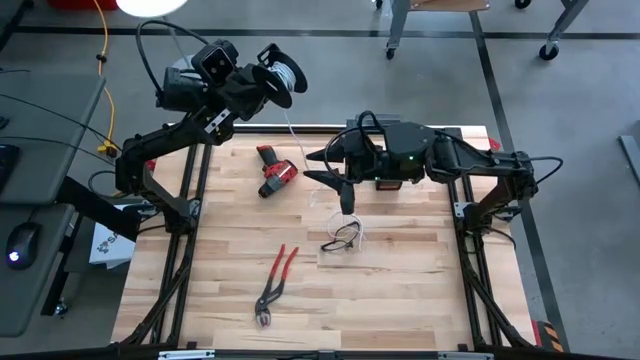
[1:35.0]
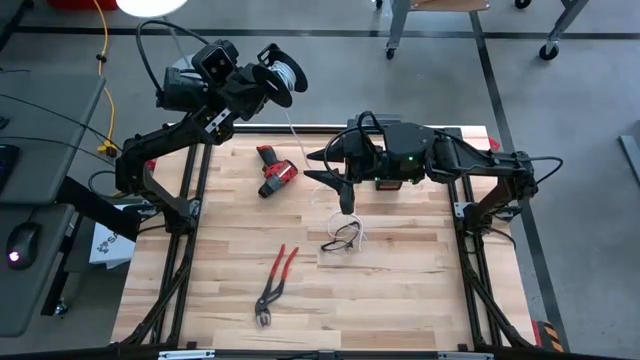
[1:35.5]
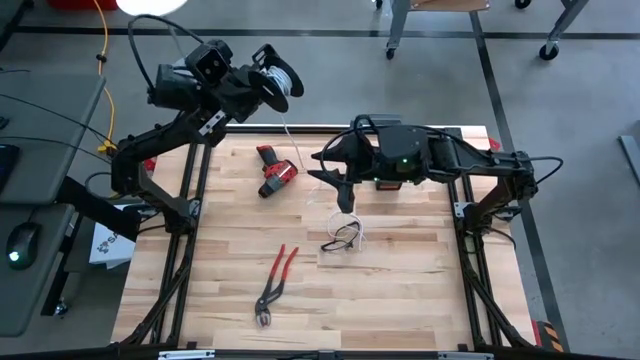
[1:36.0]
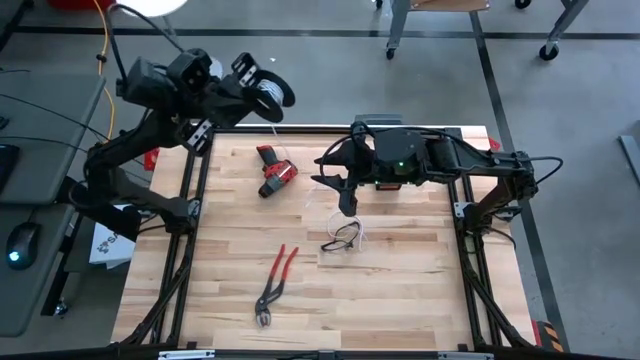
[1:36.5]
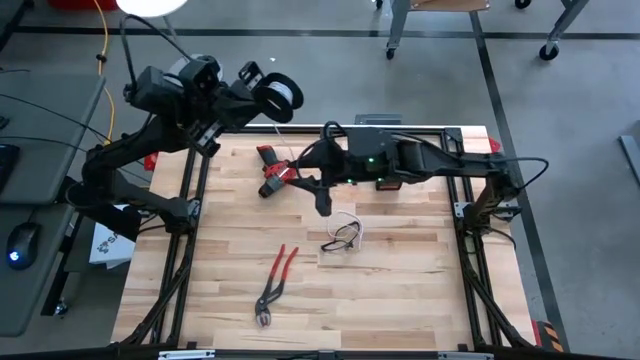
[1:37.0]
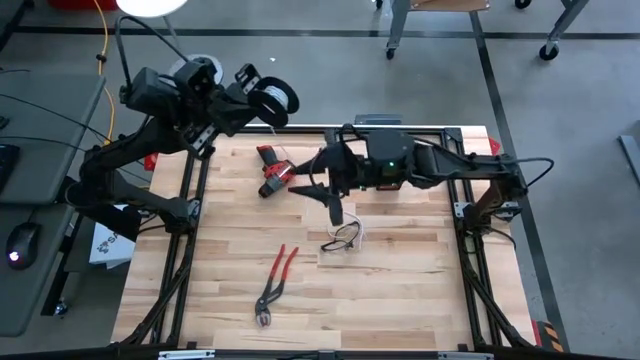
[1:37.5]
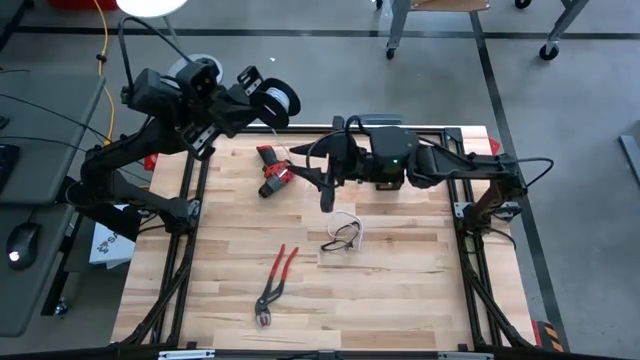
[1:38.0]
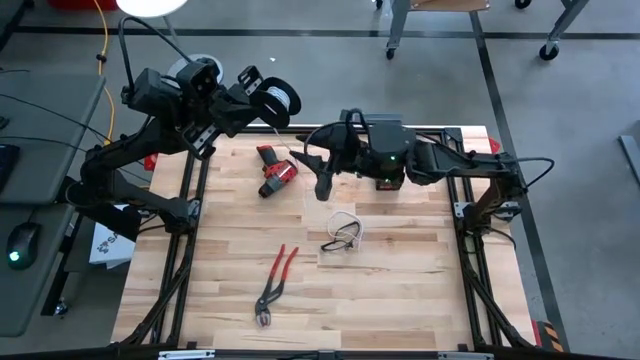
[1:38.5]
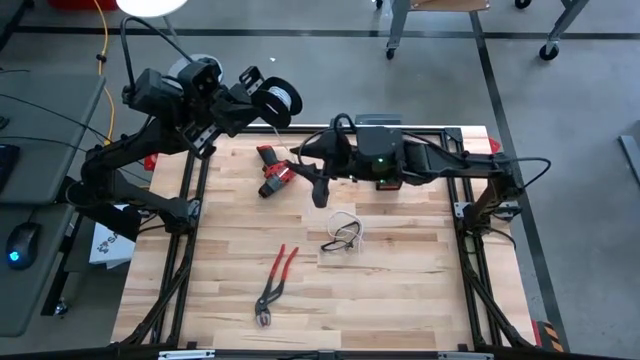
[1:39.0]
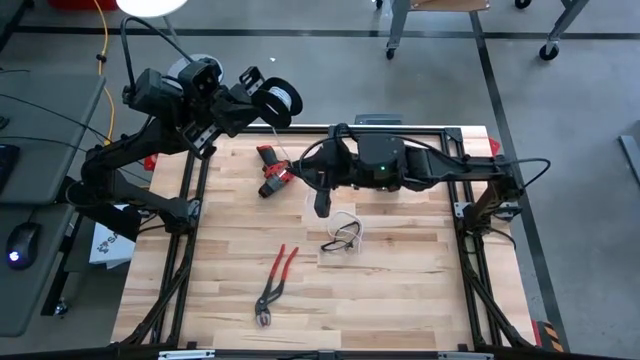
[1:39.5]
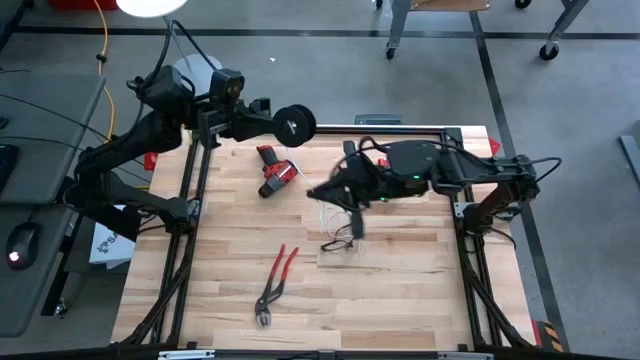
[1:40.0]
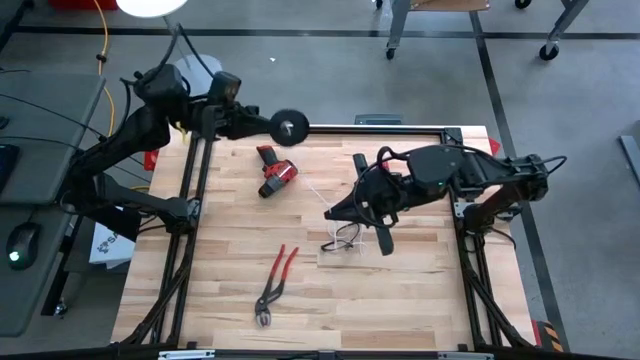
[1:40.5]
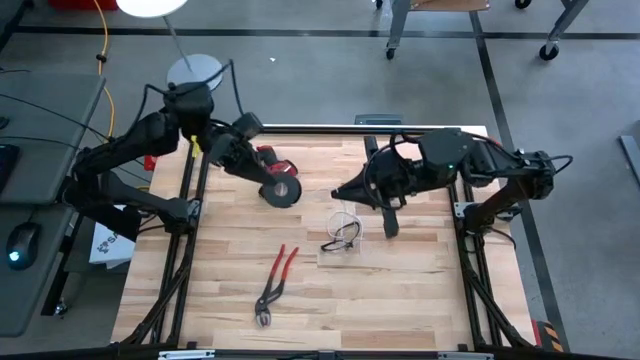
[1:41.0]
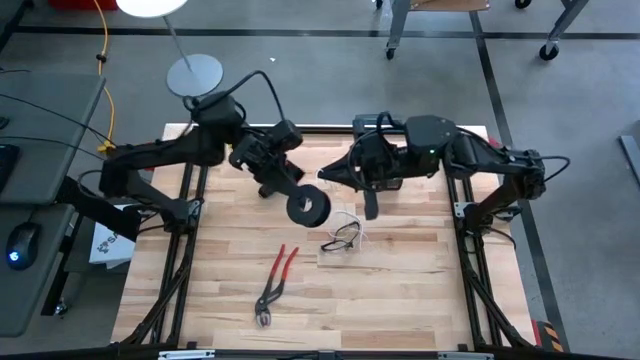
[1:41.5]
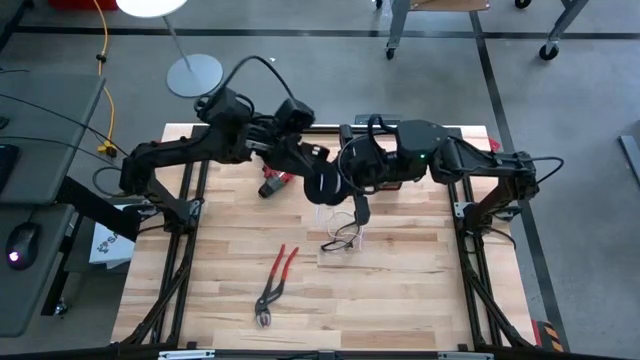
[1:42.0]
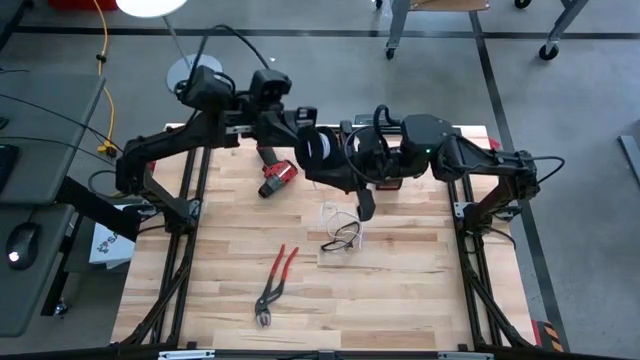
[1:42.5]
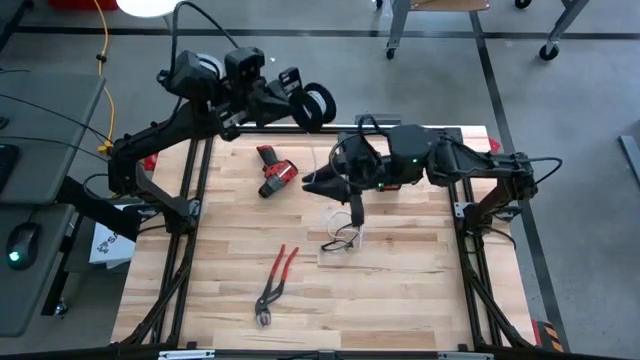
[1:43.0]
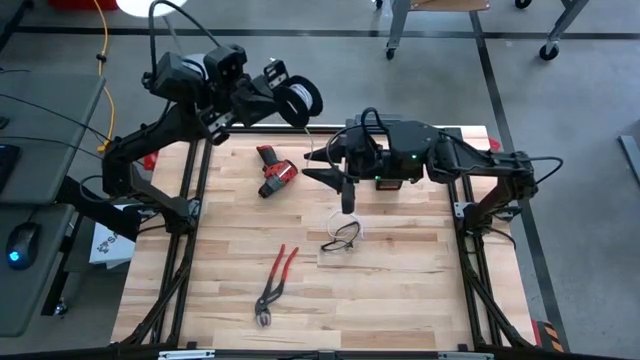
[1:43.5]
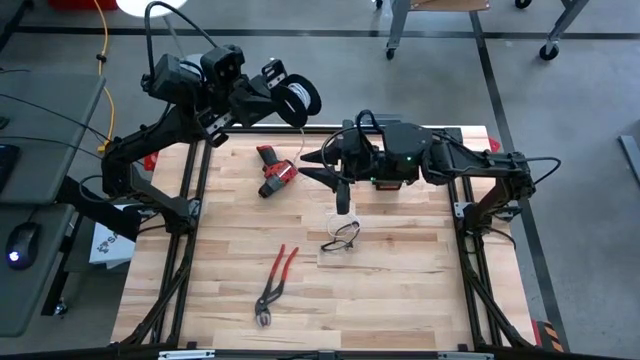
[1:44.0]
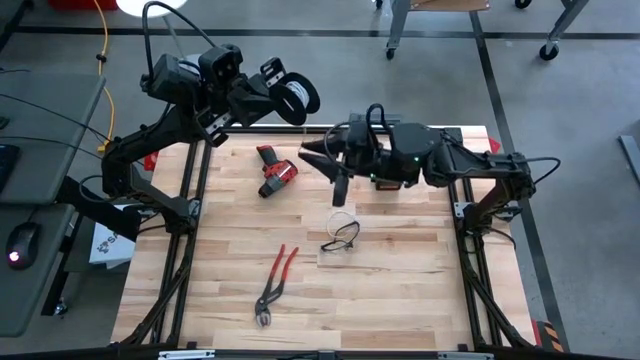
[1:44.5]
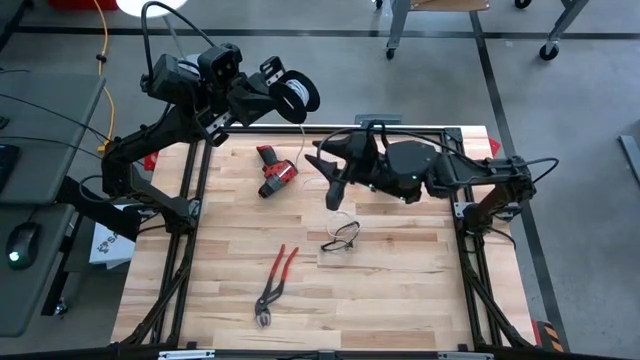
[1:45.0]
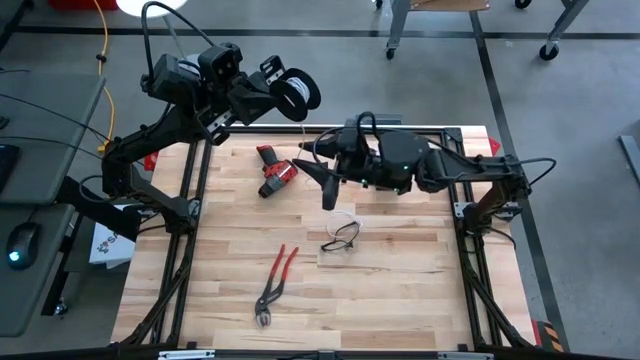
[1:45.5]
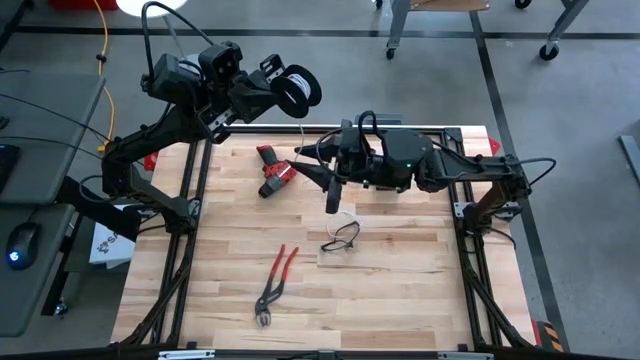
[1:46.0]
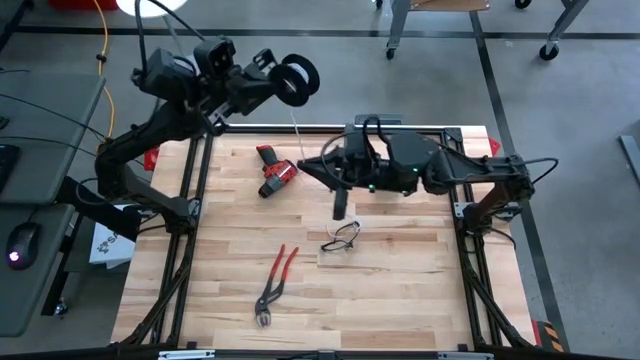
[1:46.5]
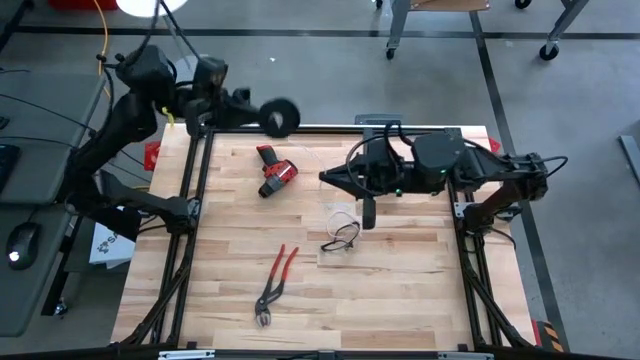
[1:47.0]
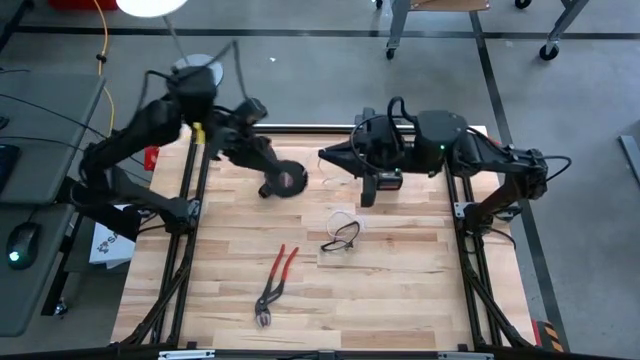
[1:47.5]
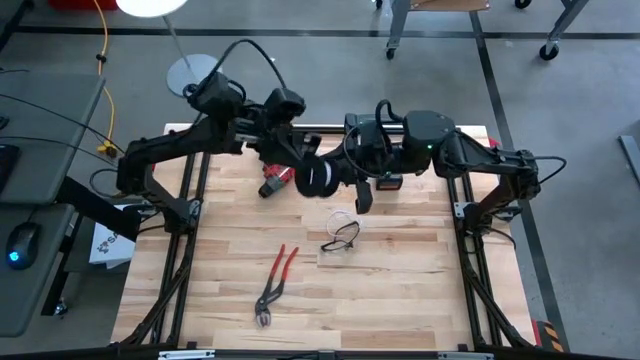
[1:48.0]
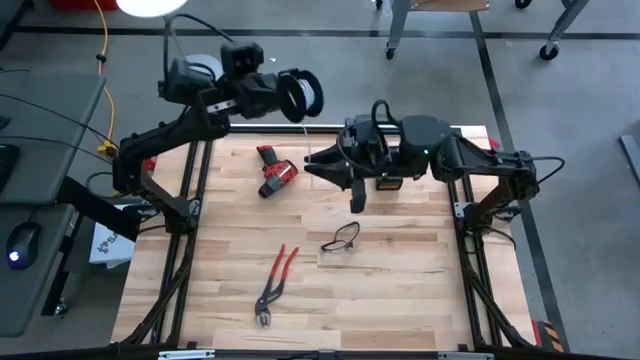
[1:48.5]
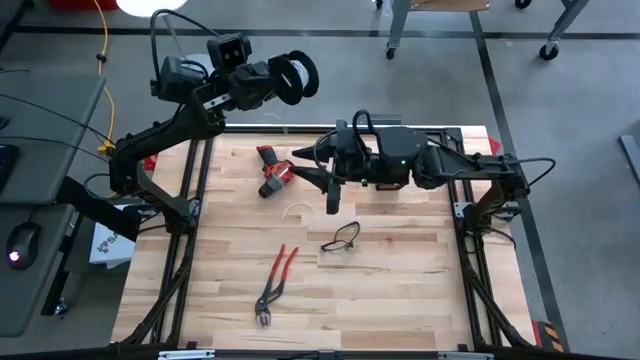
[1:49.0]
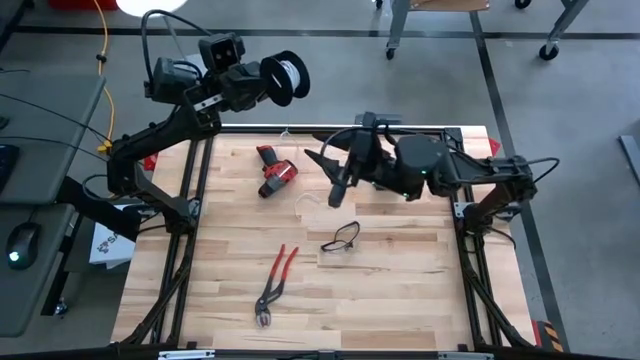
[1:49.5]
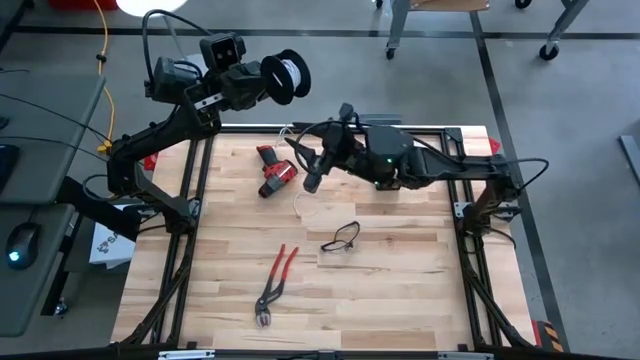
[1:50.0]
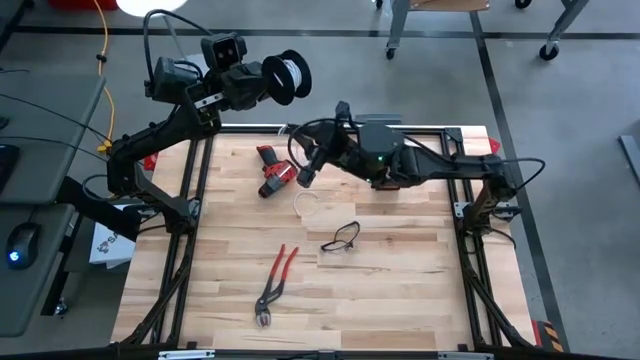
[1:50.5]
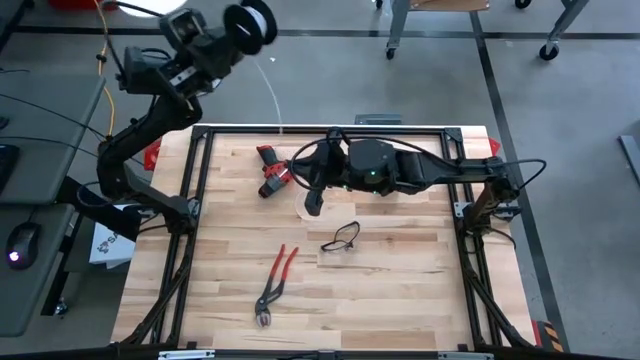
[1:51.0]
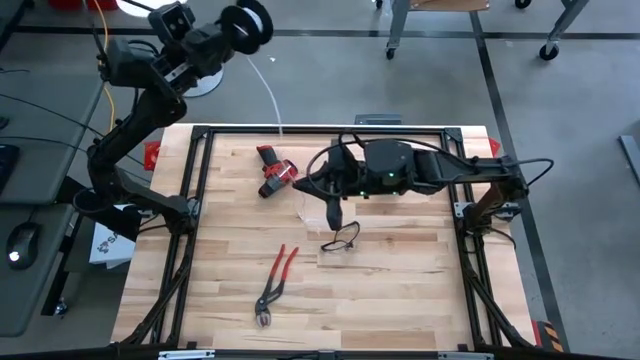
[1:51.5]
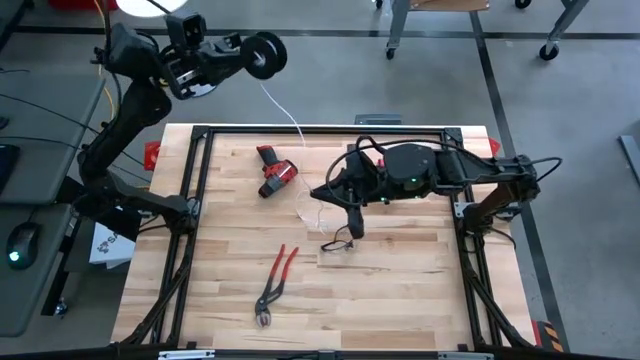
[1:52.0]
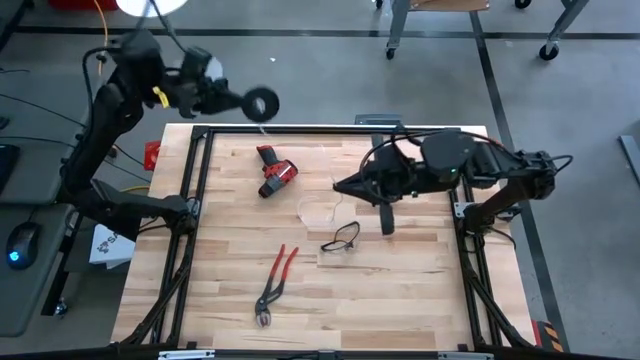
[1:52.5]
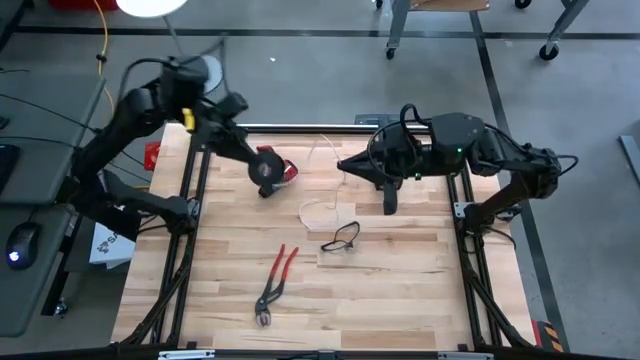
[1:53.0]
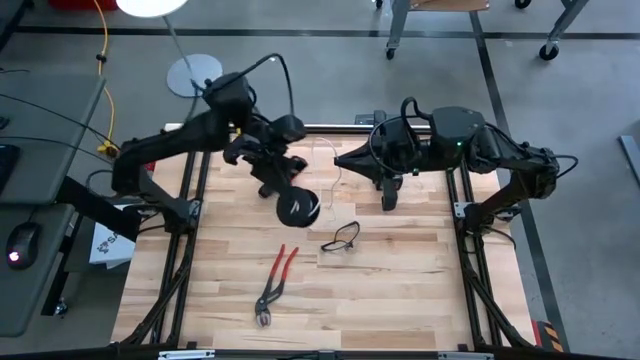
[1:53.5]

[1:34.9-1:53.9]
Task: Coil cords
Coil the white wire onto the black spool

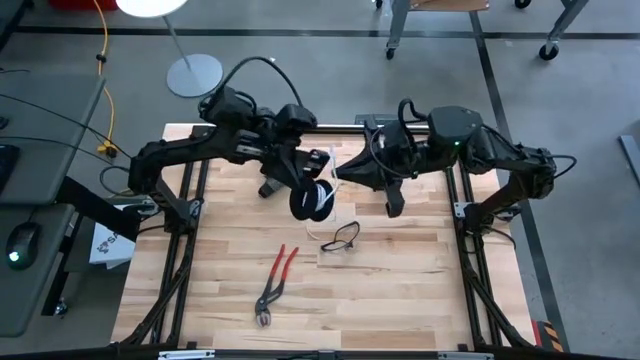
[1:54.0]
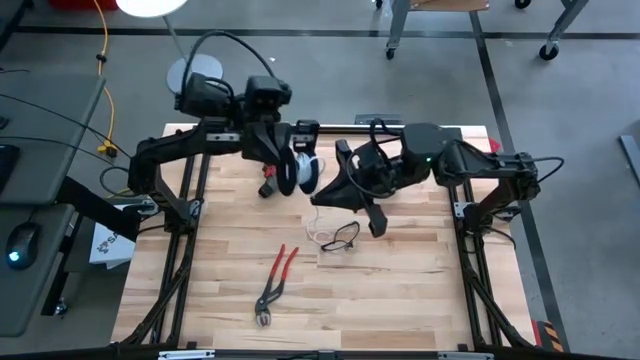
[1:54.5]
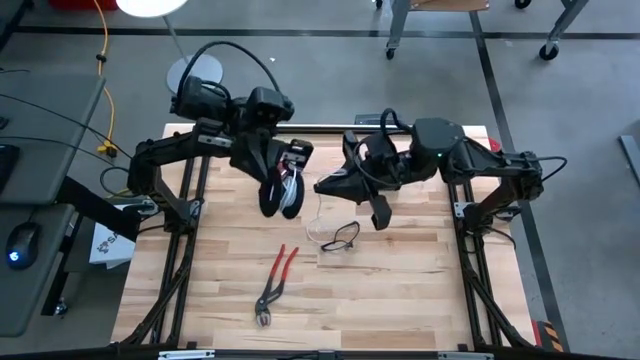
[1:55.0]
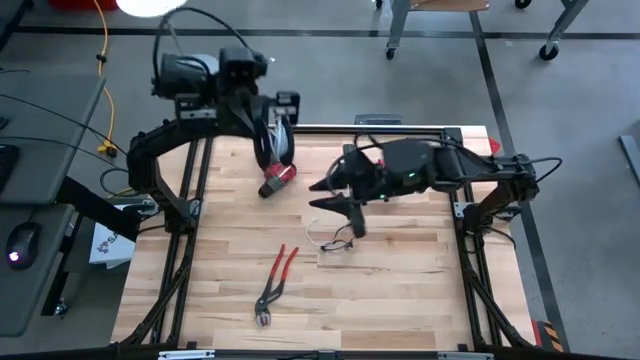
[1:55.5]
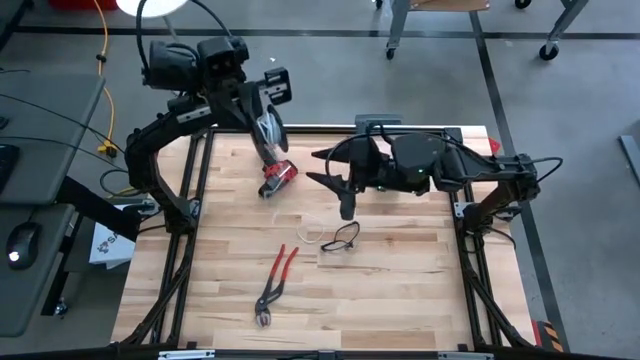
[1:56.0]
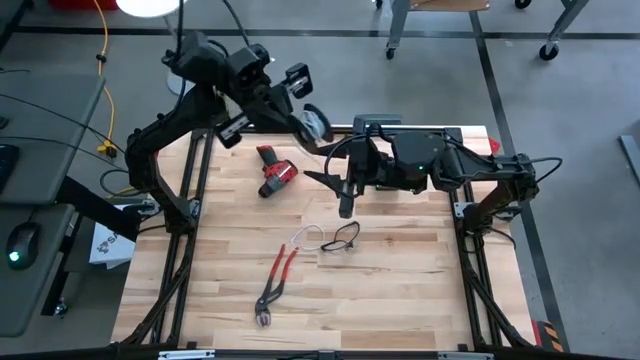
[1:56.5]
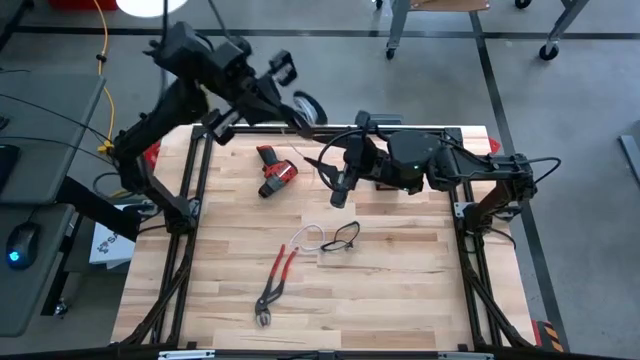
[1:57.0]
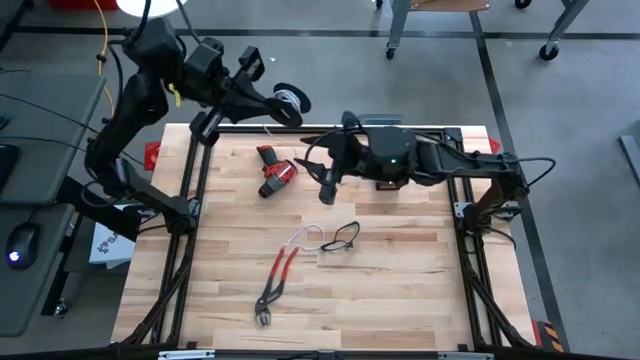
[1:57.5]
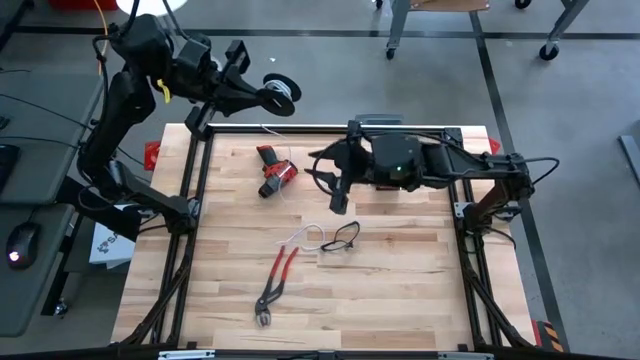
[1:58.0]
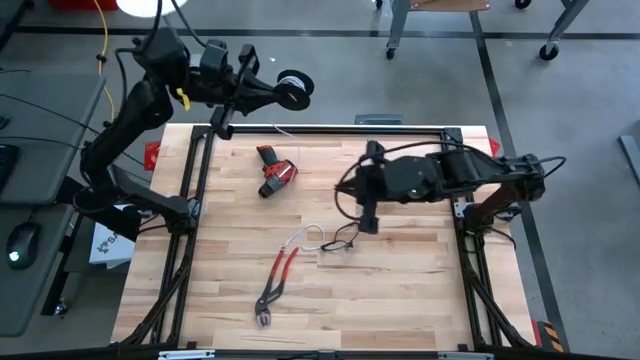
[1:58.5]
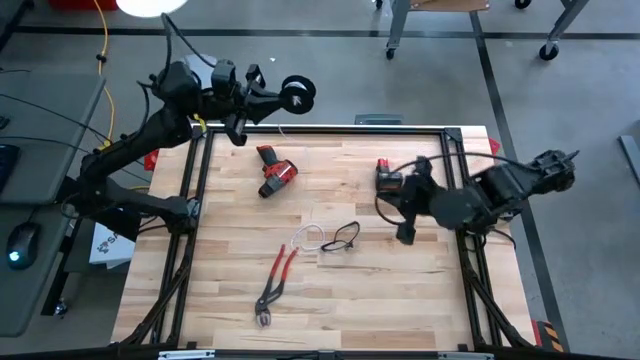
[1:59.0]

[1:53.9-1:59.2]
Coil the white wire onto the black spool
